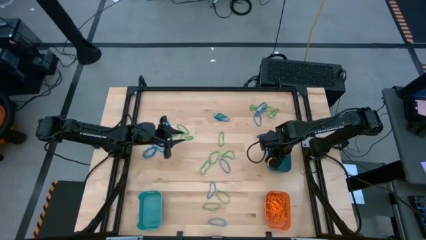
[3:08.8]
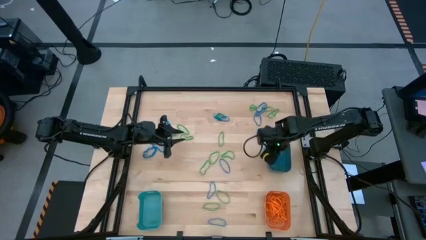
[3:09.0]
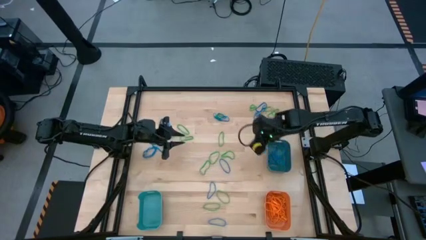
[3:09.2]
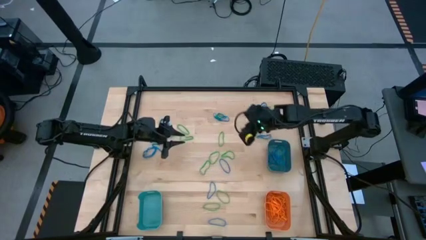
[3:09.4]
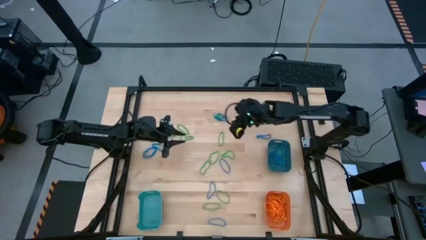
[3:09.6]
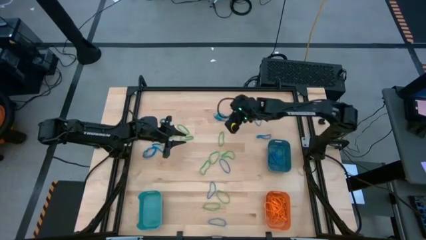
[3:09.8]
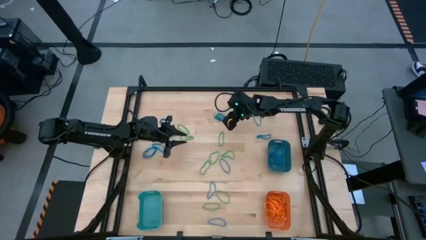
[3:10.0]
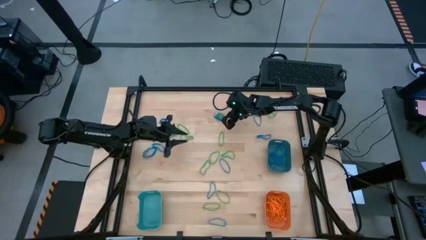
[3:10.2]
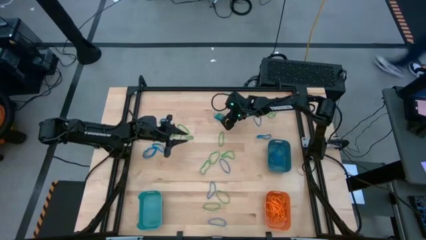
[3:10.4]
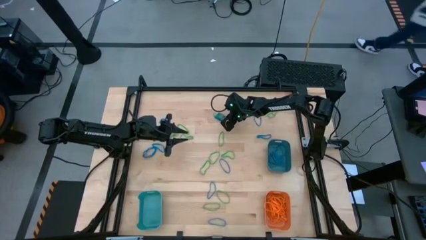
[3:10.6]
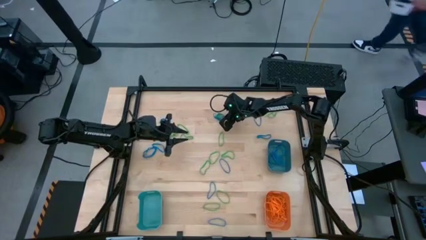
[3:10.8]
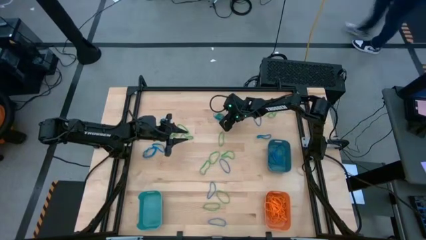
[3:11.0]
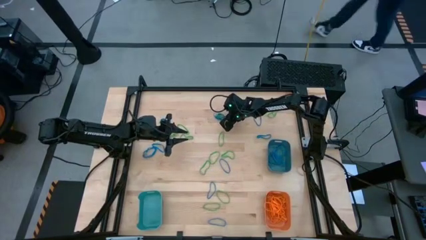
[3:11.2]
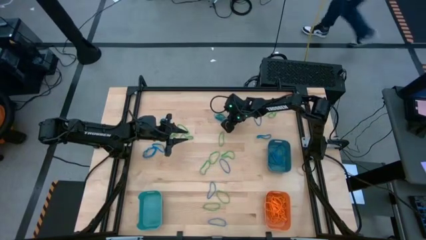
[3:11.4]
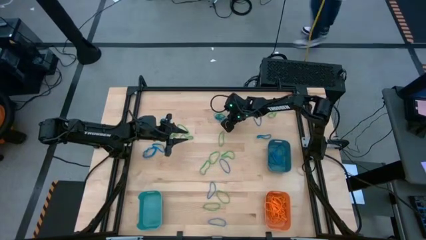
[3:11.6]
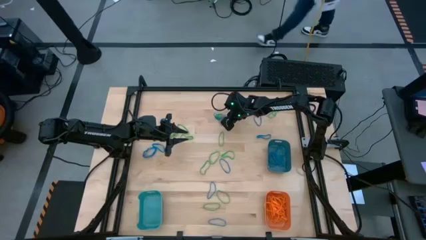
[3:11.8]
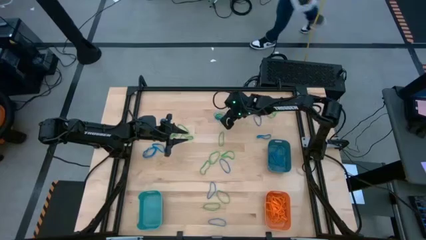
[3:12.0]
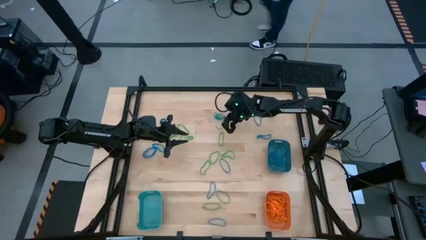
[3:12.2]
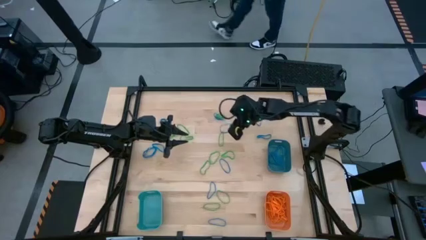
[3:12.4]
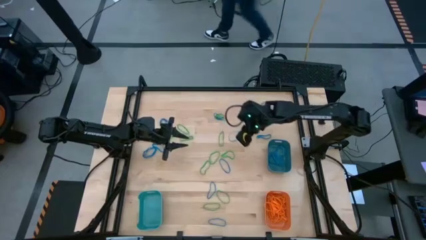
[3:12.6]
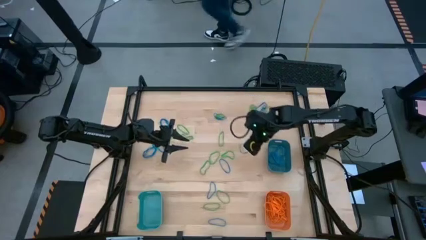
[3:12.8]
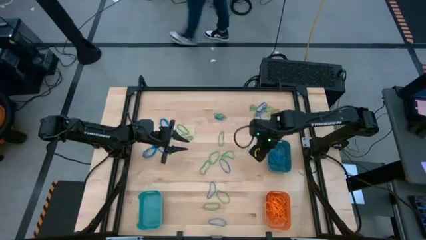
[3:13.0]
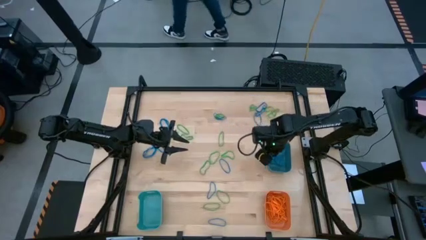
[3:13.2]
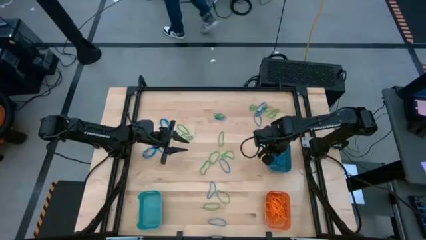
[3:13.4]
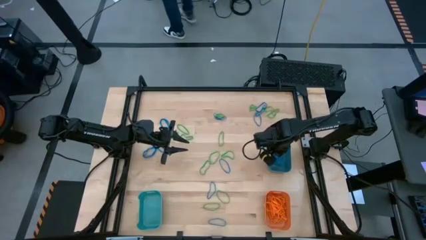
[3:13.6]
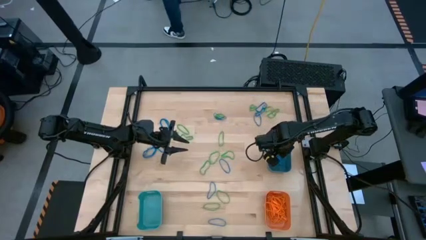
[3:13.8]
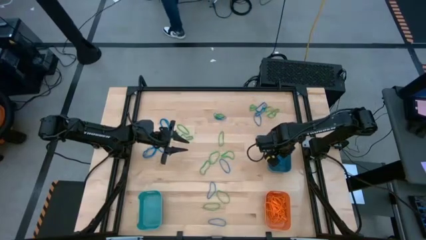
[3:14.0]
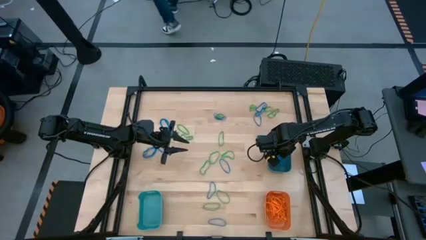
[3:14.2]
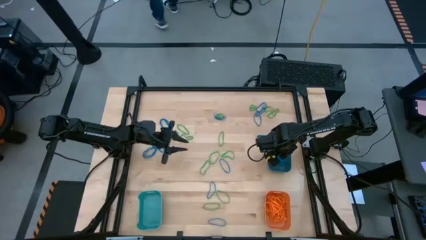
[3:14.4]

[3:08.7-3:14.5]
Task: Sort rubber bands into baskets
Put the blue rubber band into the dark blue bin

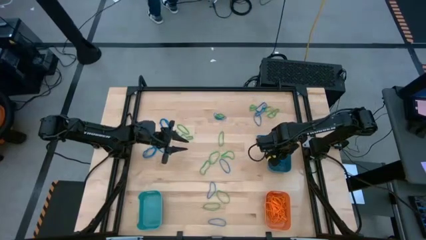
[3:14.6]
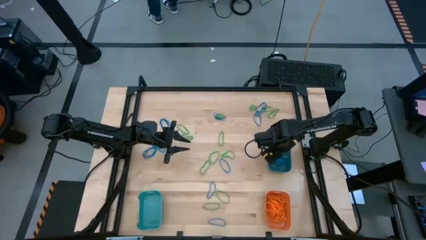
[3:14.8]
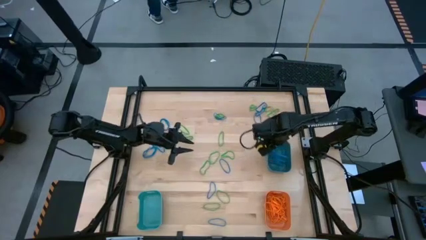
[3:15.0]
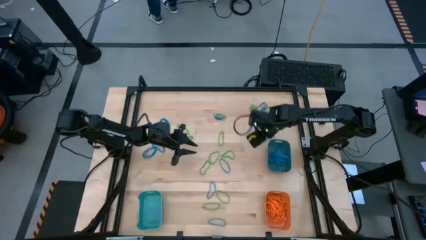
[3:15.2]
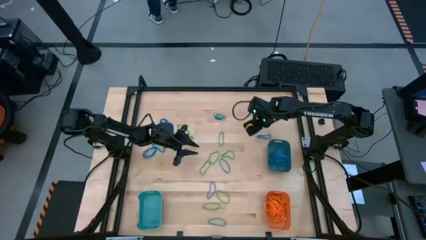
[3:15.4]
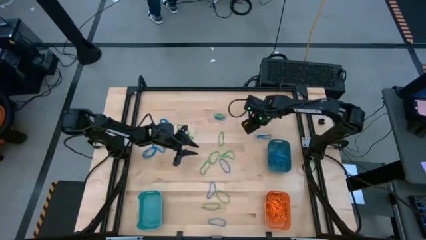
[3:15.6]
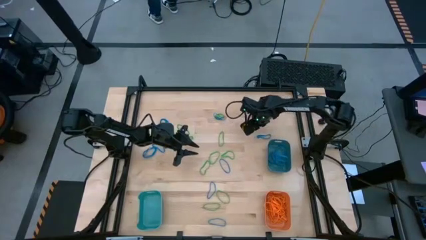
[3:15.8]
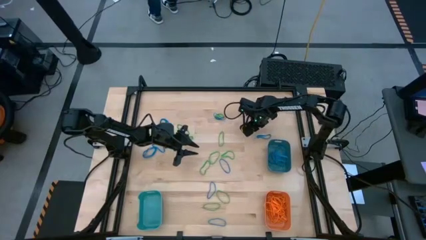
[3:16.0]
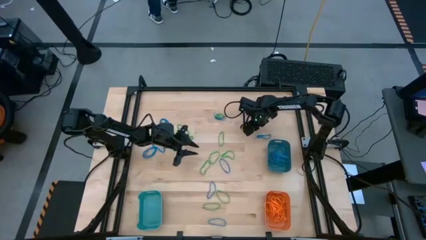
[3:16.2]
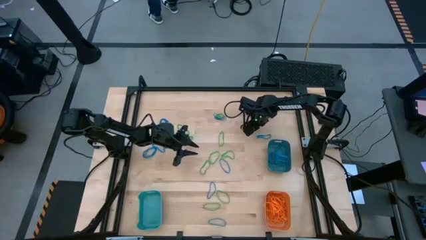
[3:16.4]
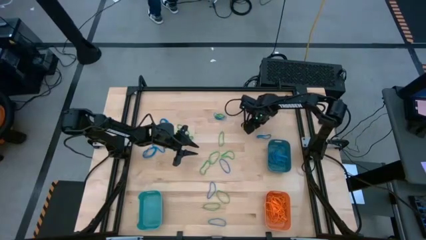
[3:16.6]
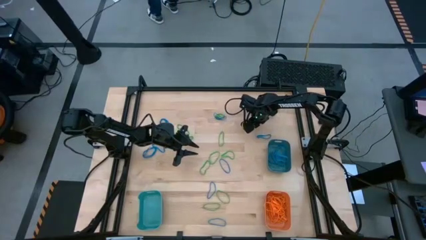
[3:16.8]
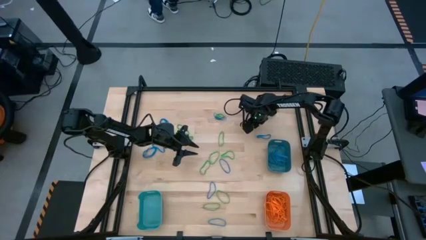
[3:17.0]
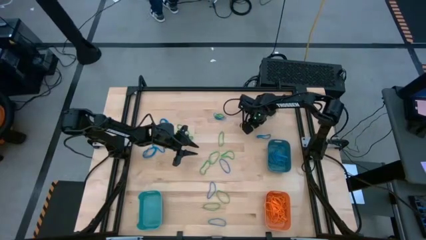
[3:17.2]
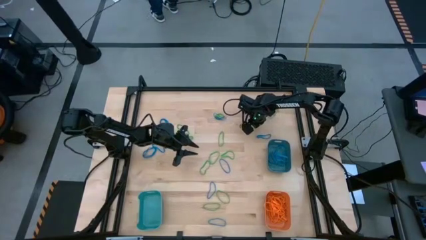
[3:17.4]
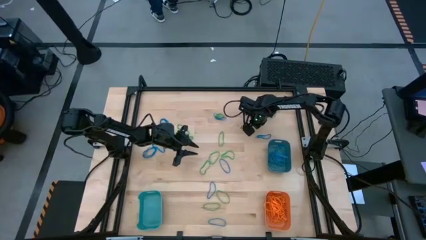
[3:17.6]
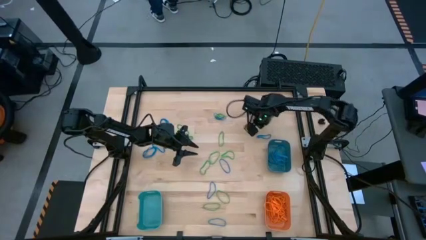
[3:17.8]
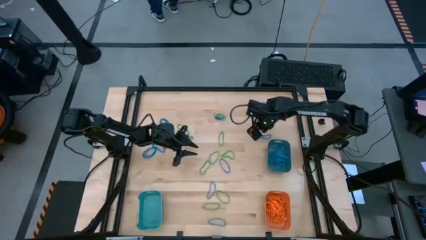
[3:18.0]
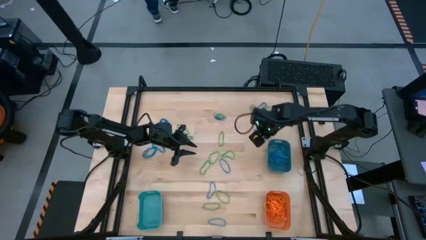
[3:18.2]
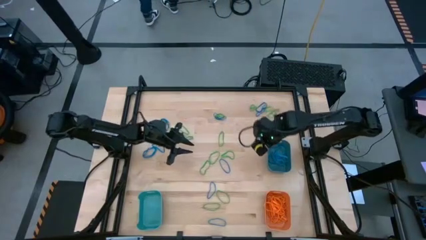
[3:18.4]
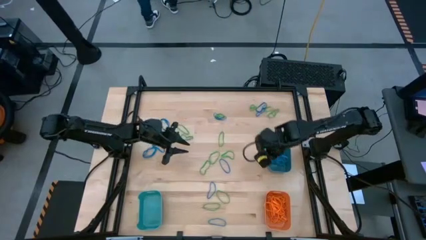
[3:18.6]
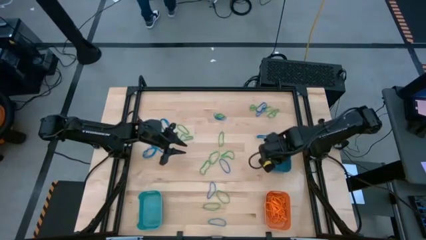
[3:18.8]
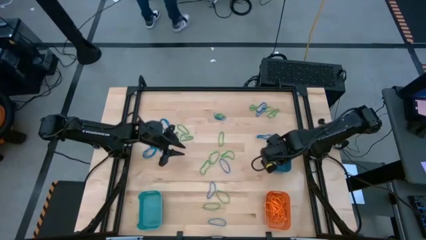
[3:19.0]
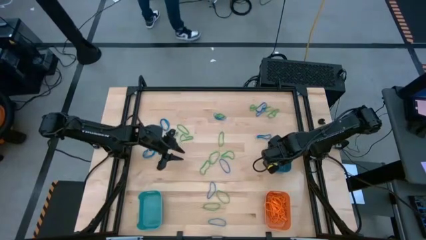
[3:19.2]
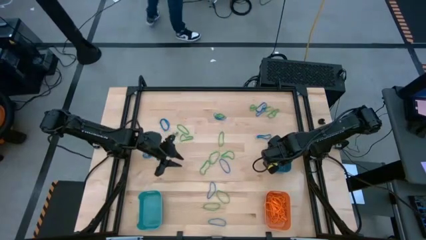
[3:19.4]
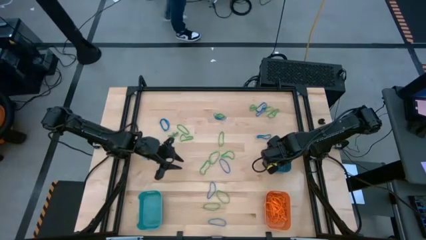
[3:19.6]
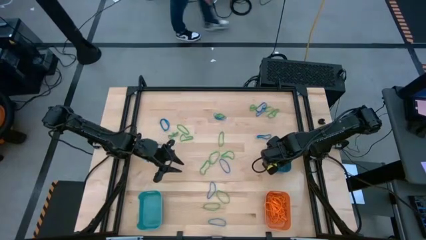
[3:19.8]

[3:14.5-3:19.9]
Put the blue rubber band into the dark blue bin

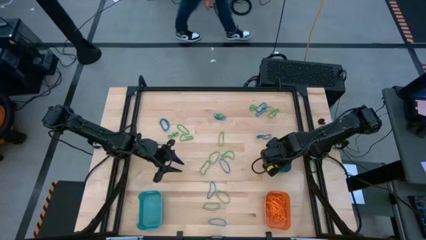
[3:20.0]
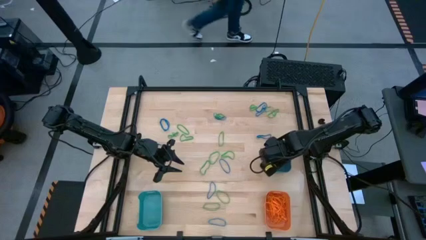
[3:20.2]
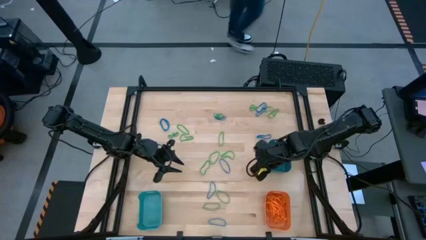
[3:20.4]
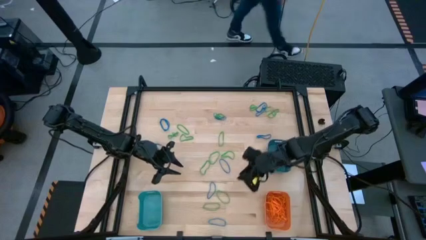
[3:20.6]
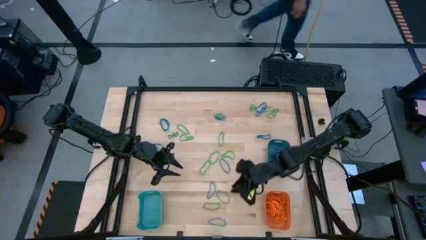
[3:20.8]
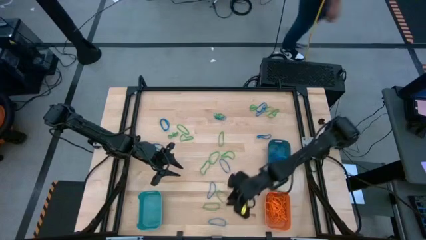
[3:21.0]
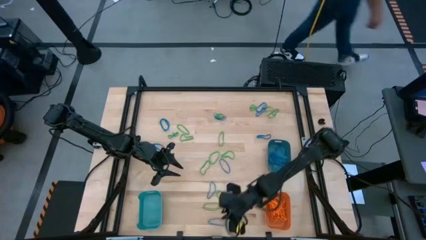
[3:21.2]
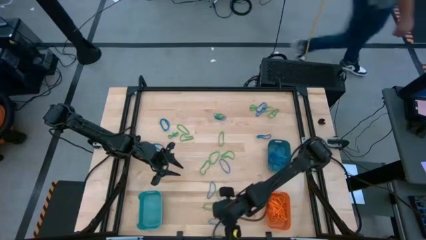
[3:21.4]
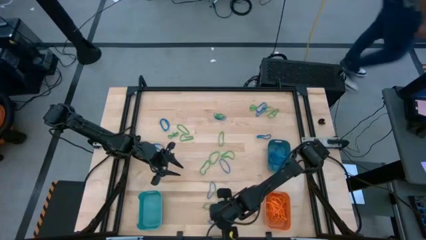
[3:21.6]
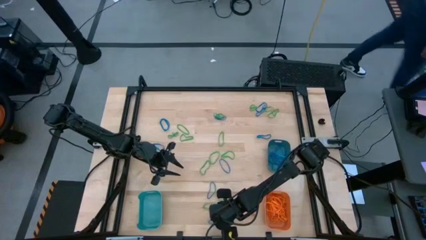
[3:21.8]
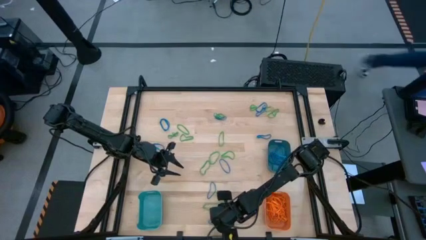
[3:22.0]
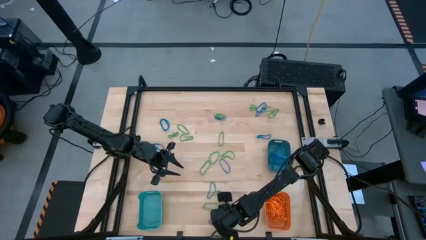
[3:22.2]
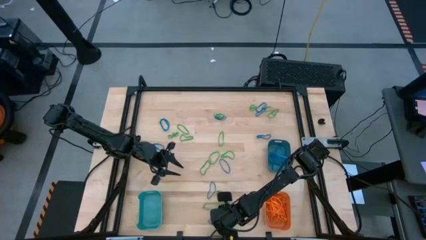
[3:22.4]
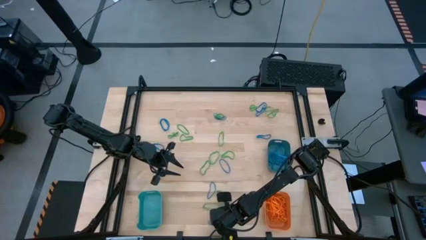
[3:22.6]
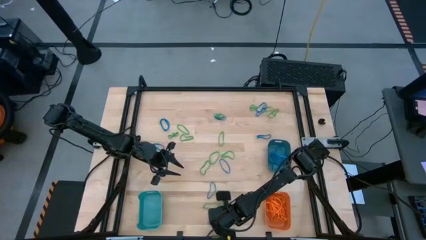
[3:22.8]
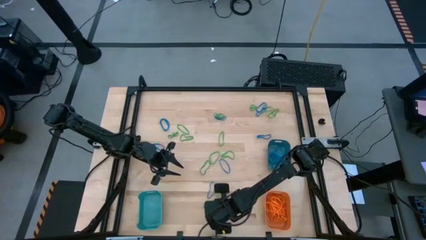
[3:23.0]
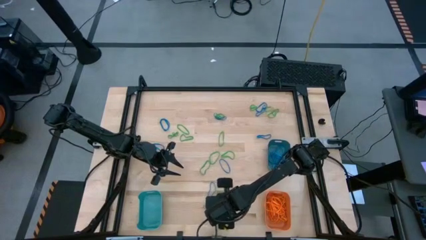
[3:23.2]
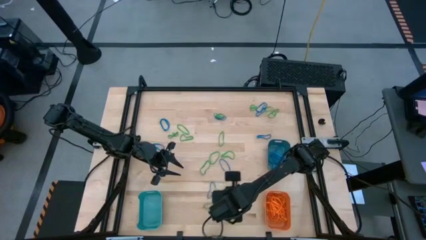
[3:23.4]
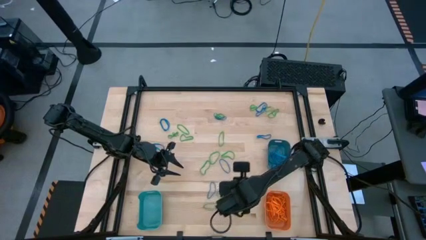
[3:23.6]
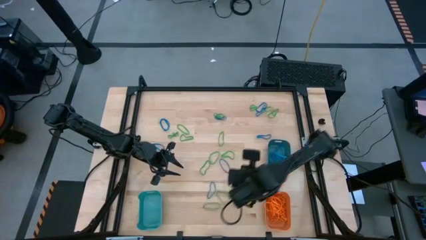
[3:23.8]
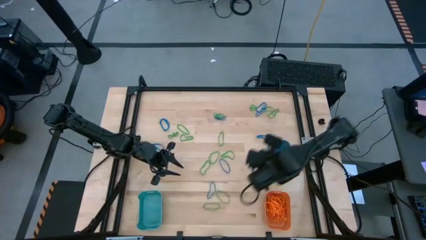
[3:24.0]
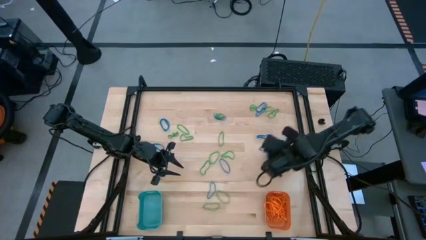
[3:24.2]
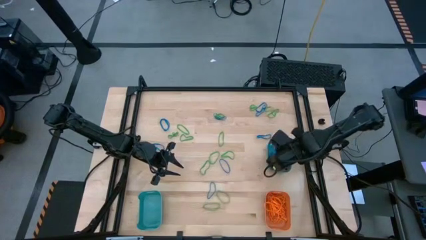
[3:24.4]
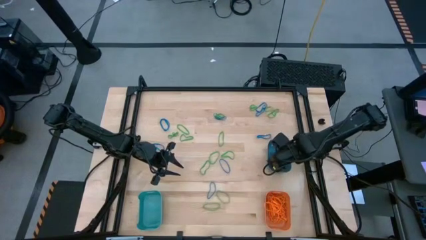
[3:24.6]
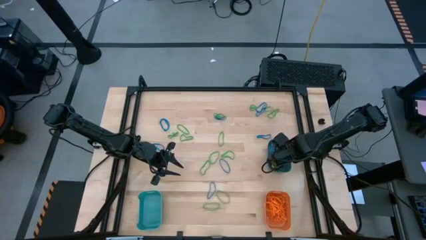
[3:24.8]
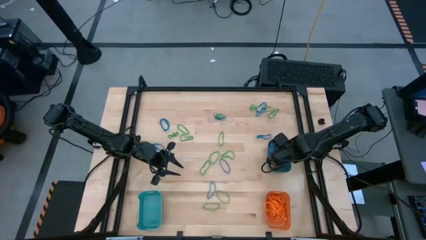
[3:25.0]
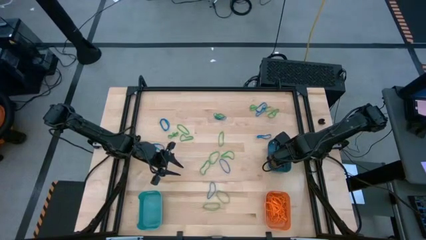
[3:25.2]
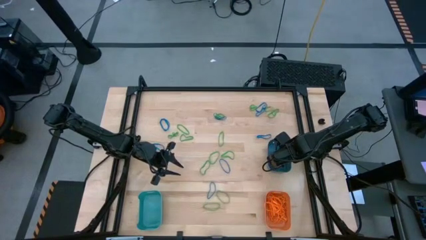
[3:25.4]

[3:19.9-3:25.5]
Put the blue rubber band into the dark blue bin
